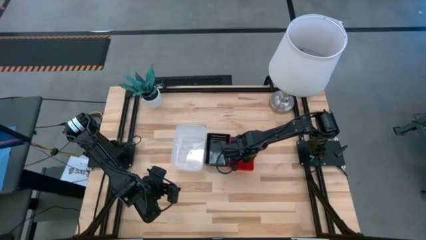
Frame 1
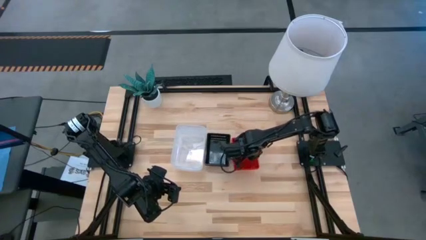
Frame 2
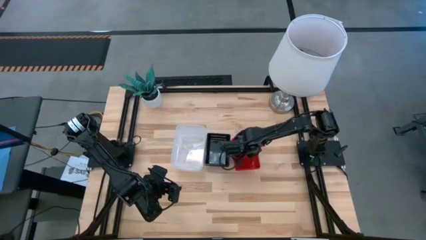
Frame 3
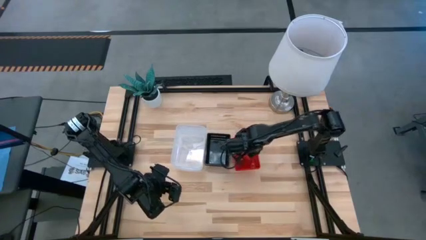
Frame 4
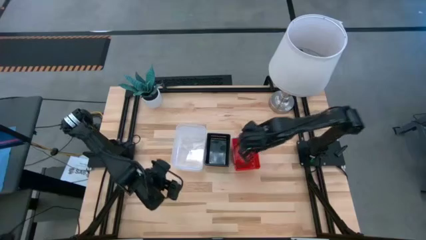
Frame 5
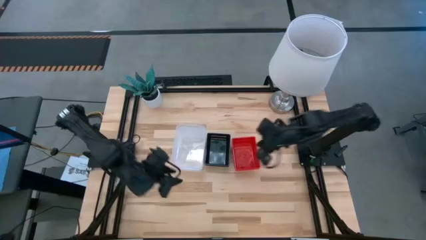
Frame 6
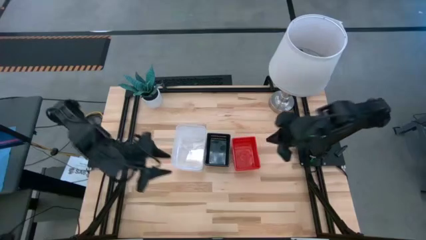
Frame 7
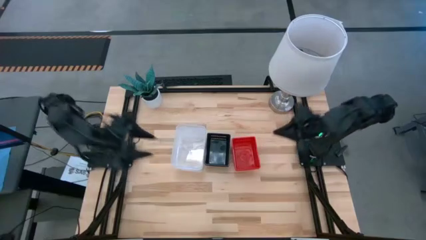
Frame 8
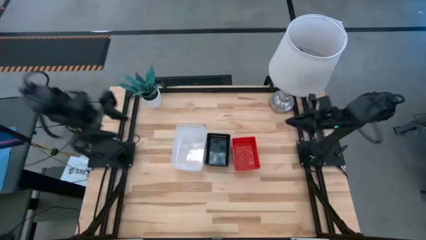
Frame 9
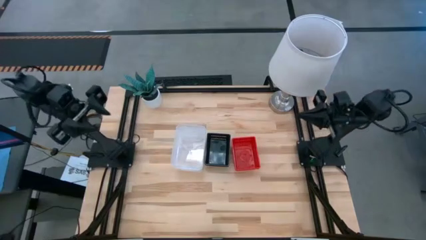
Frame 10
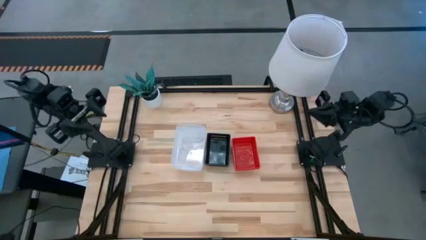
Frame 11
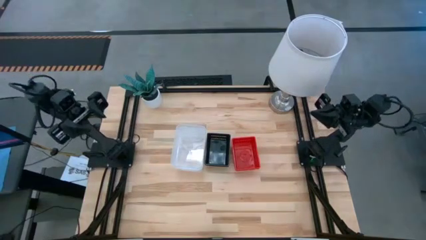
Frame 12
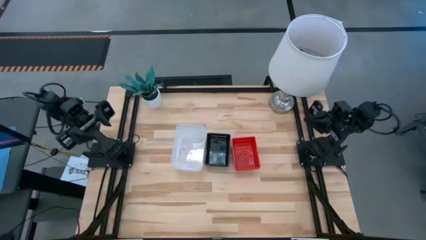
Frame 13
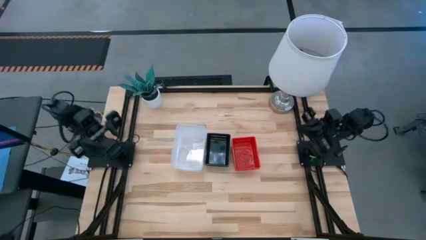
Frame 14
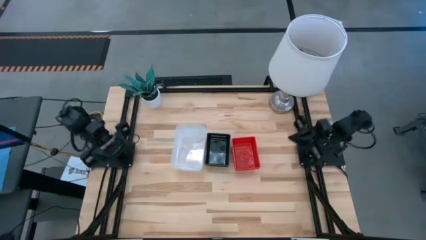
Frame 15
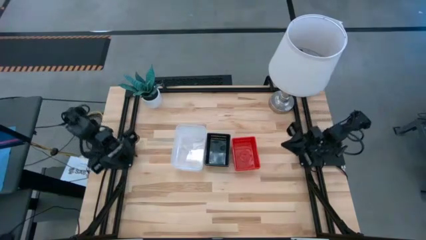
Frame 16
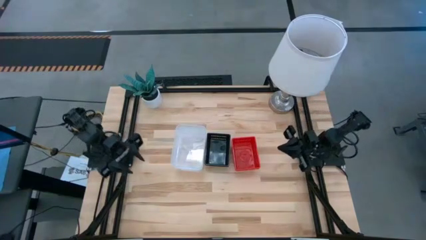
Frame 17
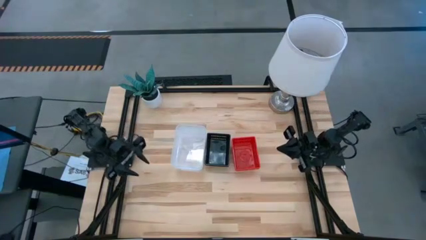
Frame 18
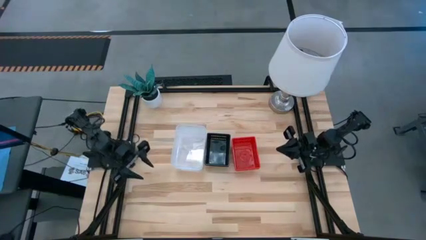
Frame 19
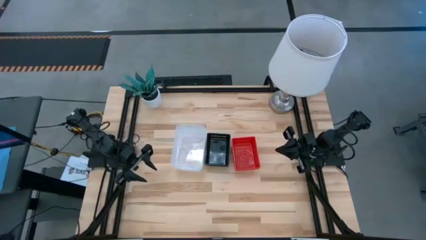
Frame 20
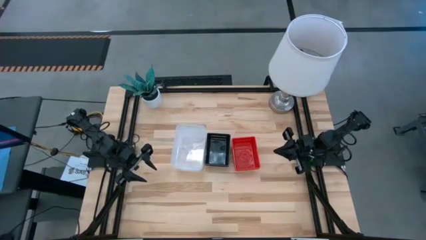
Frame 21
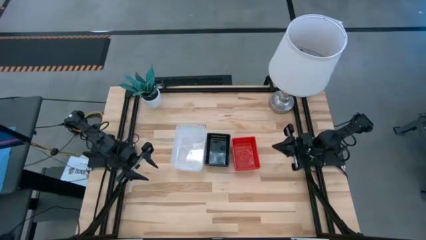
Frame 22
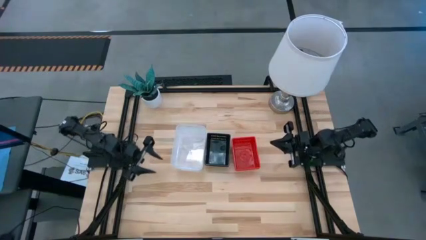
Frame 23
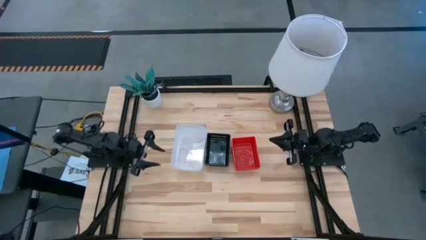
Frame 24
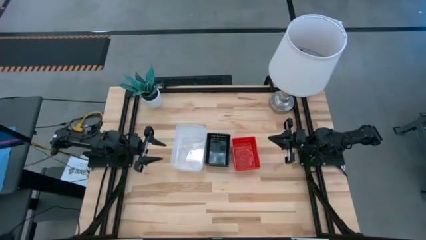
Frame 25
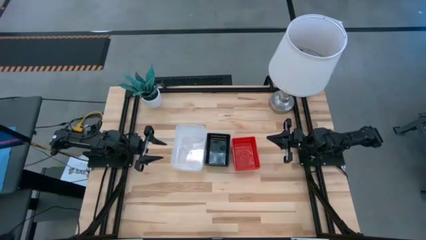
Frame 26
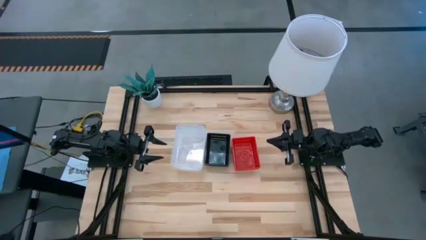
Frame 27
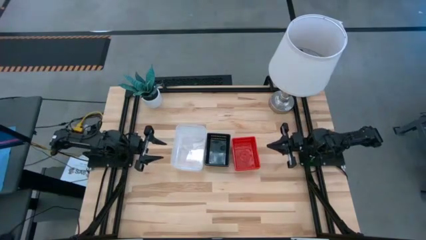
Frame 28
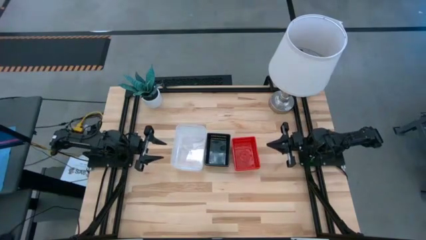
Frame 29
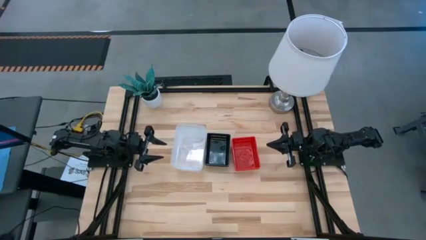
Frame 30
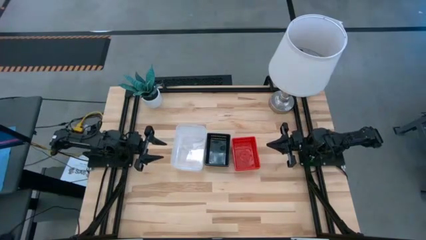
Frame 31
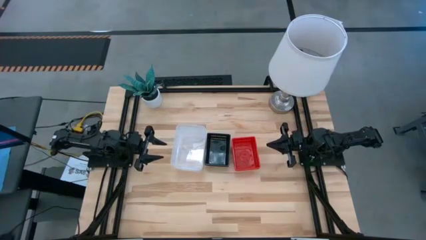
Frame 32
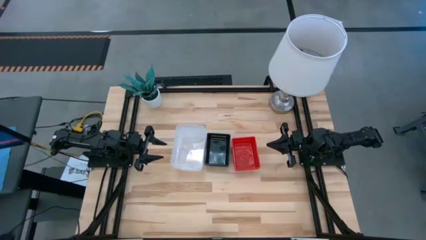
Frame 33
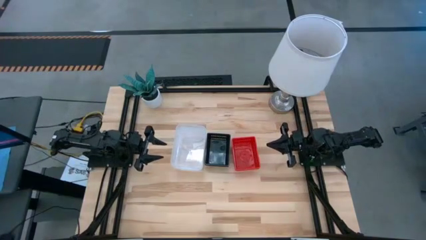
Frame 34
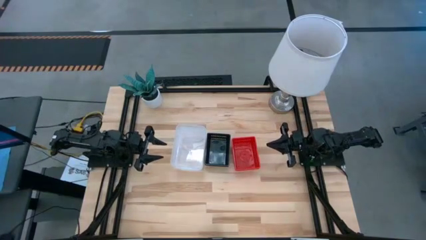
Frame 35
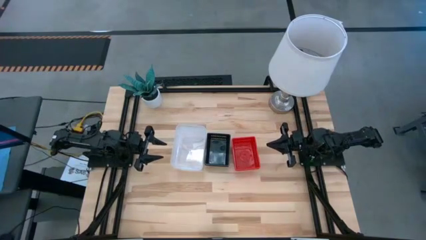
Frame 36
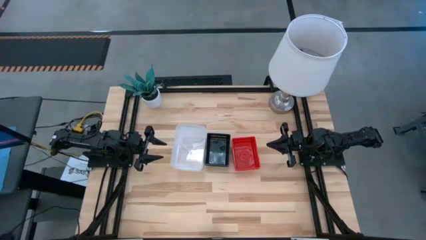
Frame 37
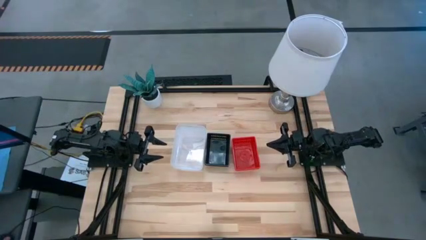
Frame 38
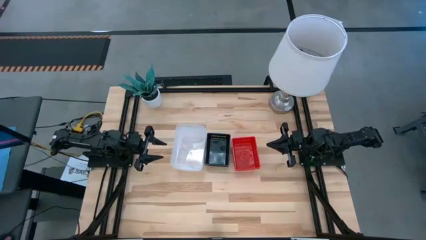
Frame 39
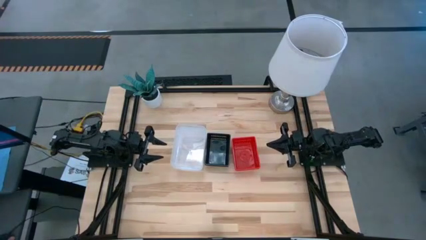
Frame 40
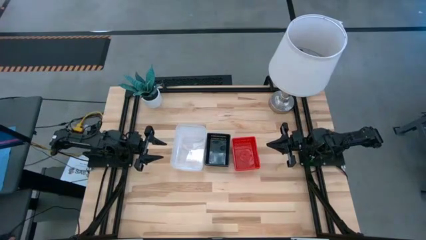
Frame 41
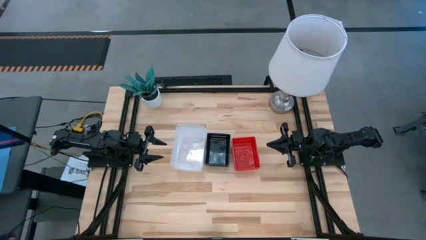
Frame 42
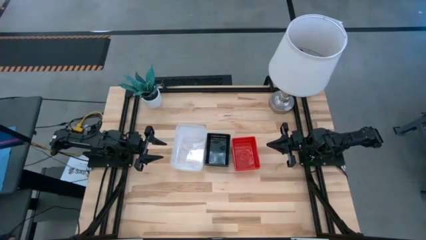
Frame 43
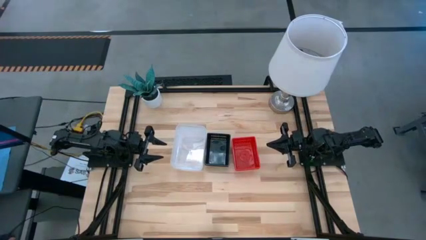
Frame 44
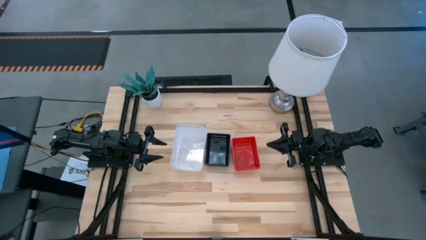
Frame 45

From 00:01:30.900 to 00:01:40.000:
Return to Home Position
